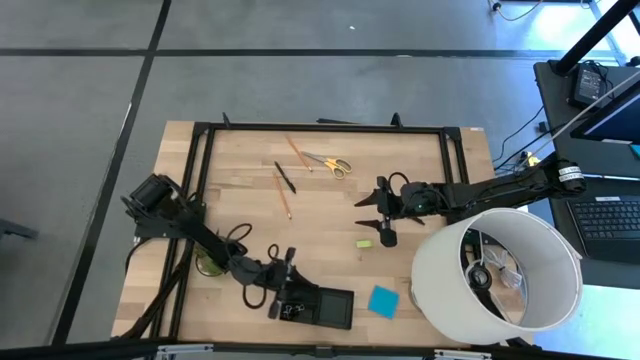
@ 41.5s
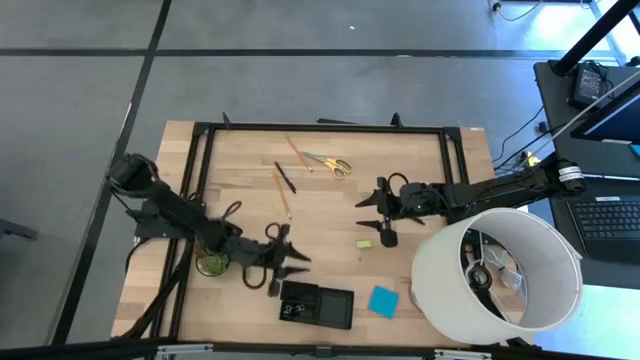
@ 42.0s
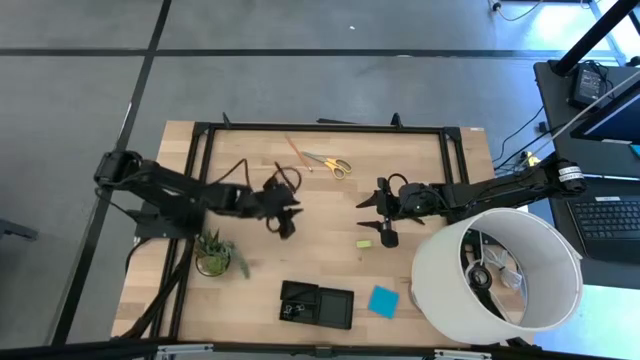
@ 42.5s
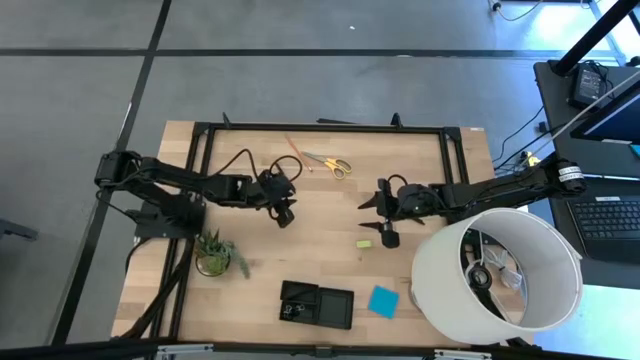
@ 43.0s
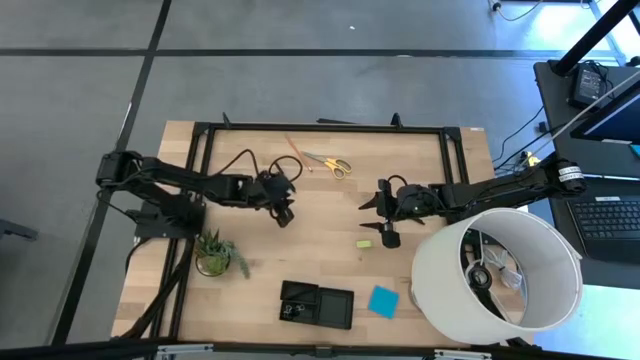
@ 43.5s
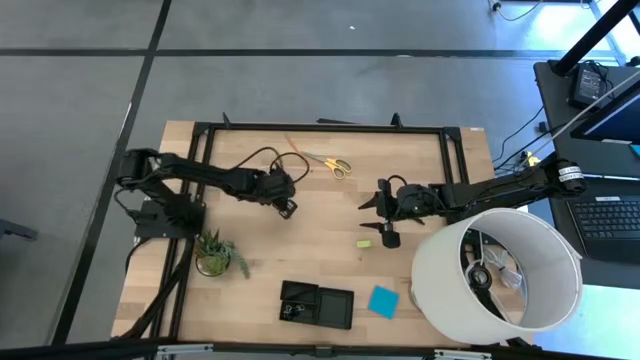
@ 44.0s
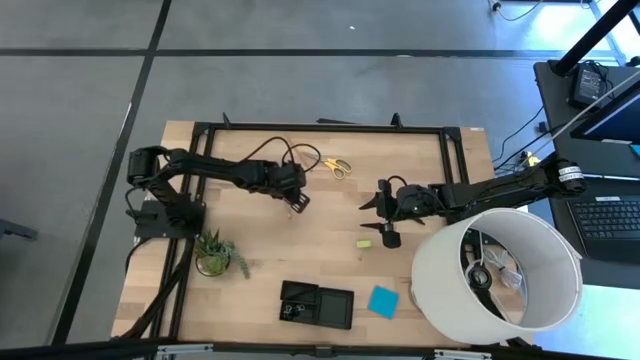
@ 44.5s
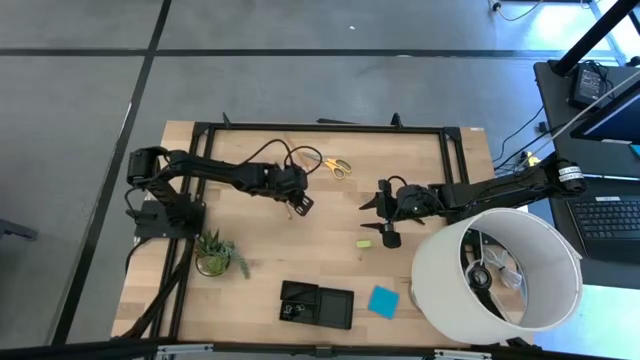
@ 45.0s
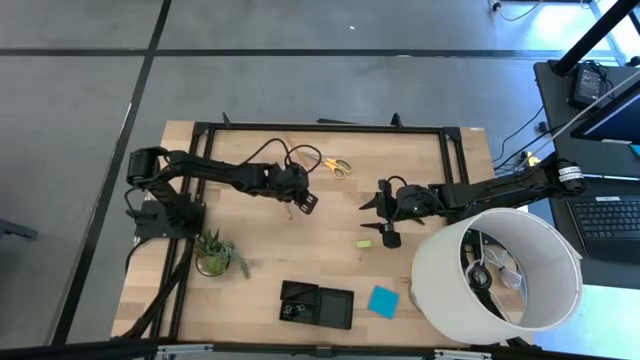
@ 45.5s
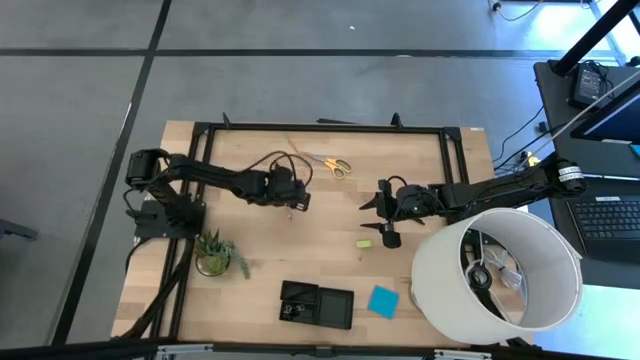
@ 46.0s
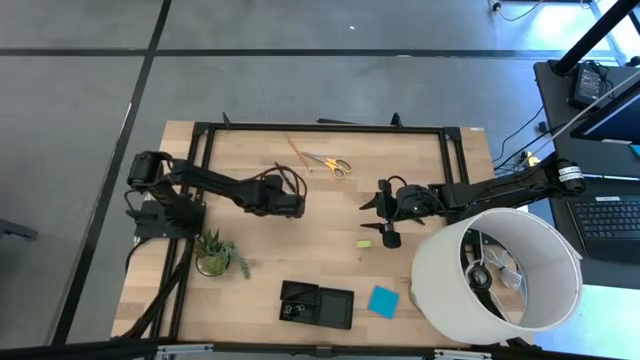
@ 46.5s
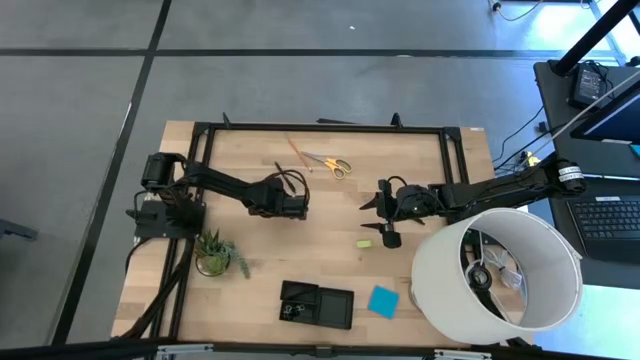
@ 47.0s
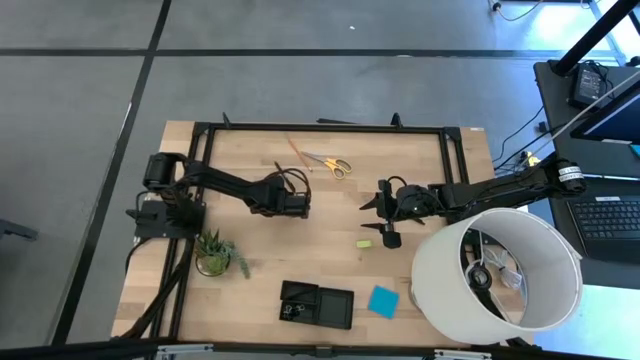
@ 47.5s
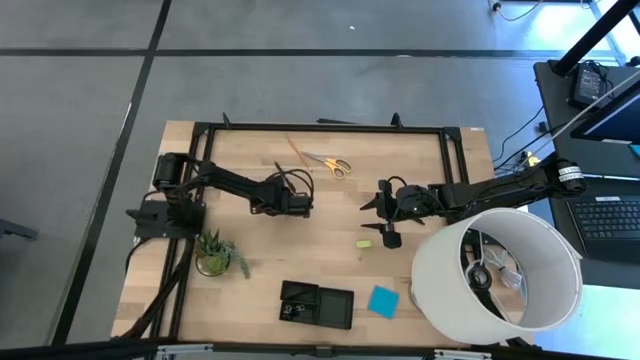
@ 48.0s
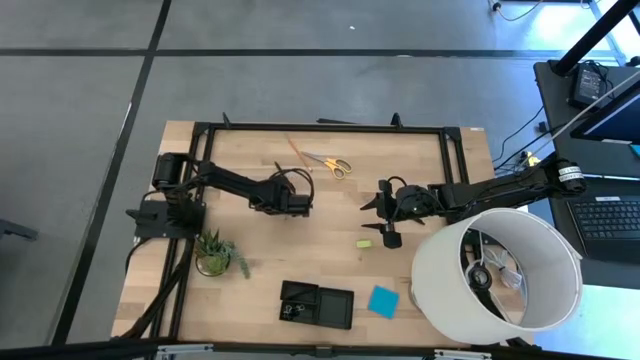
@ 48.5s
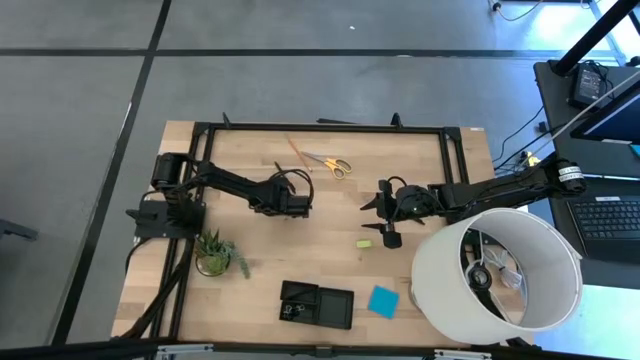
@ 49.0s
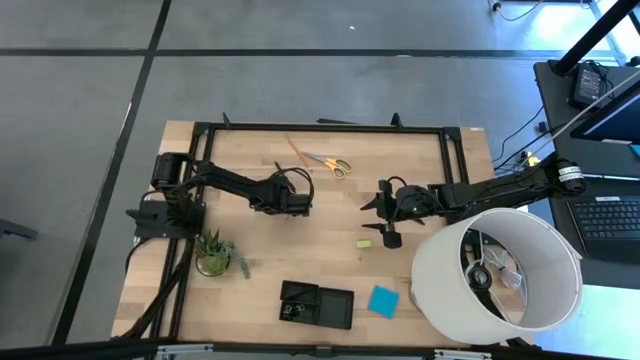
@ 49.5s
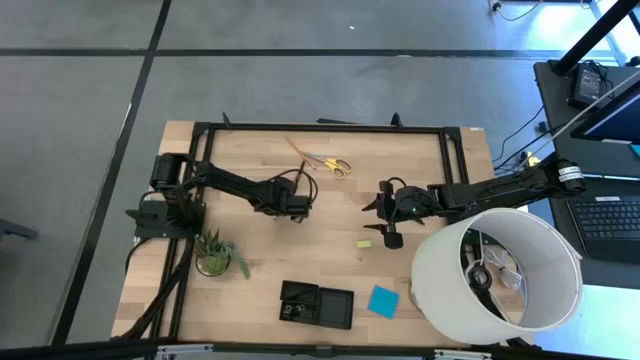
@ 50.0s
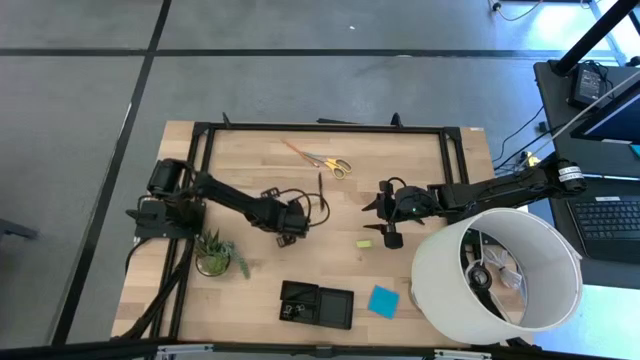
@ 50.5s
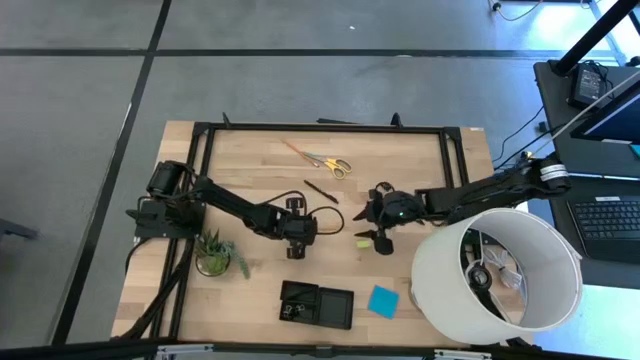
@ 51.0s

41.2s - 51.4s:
Task: Pick and place office supplies into organizer
Put the bottom yellow pencil into the black desk organizer

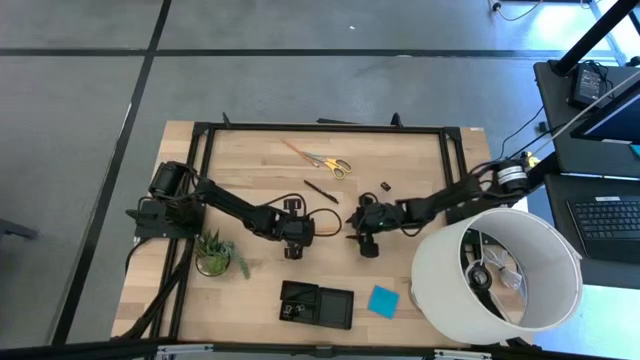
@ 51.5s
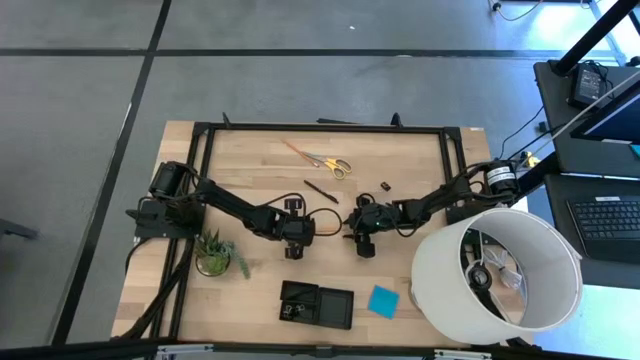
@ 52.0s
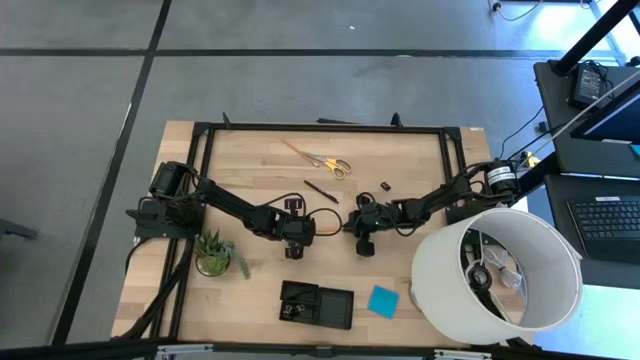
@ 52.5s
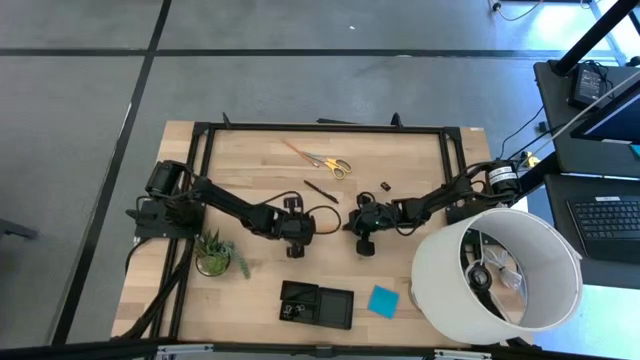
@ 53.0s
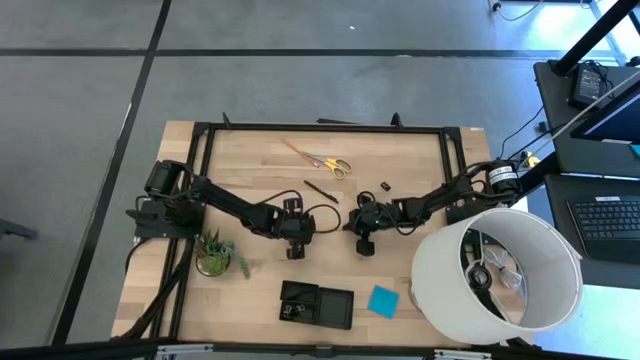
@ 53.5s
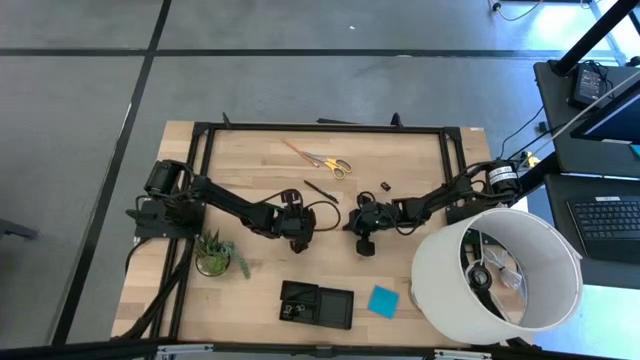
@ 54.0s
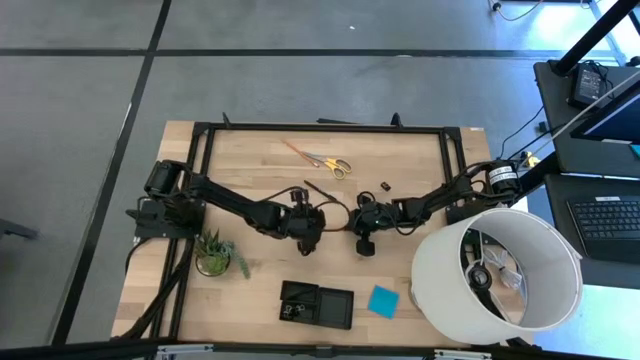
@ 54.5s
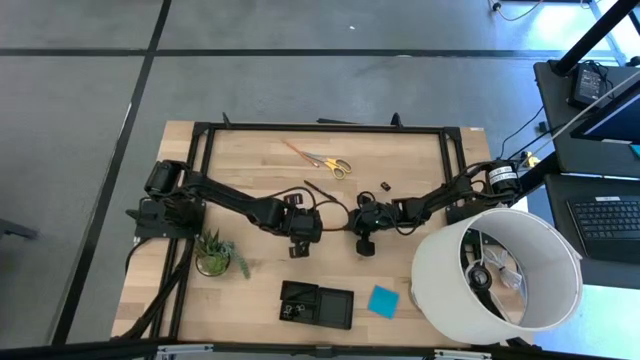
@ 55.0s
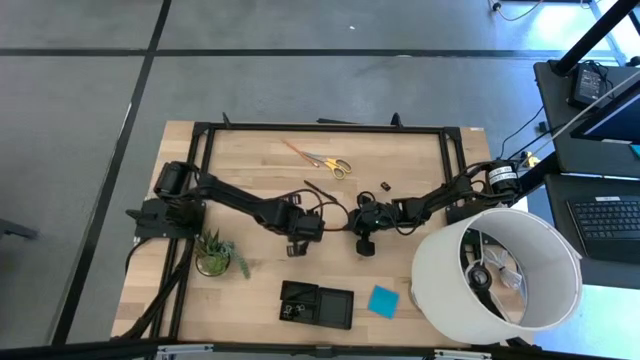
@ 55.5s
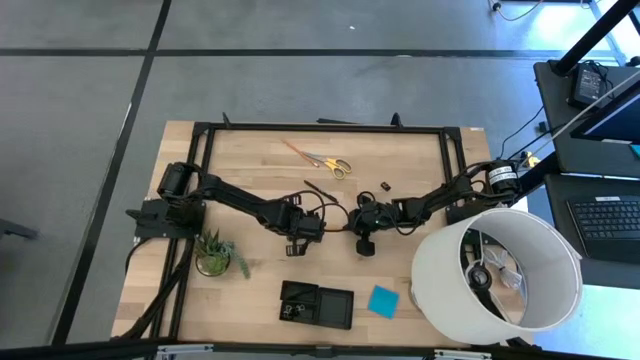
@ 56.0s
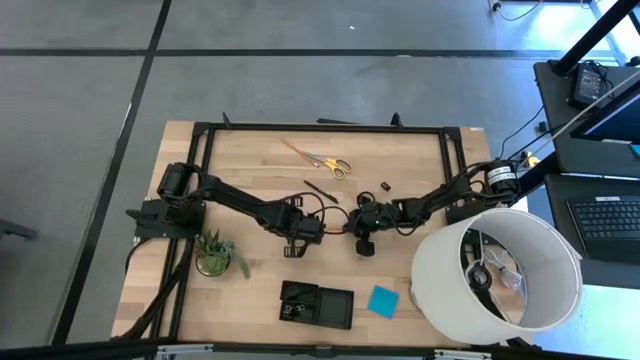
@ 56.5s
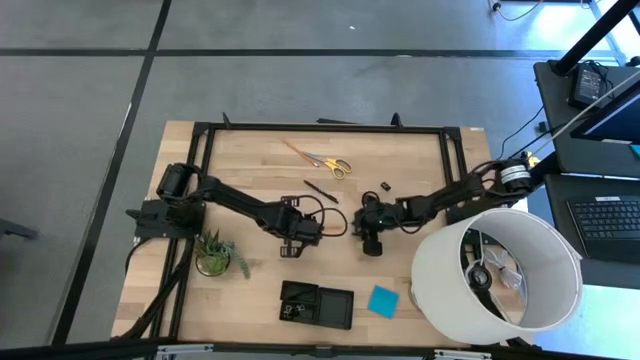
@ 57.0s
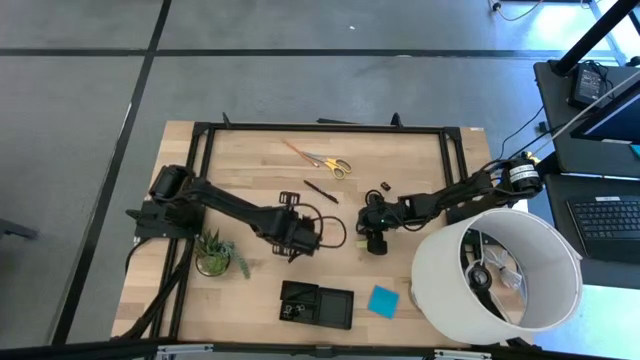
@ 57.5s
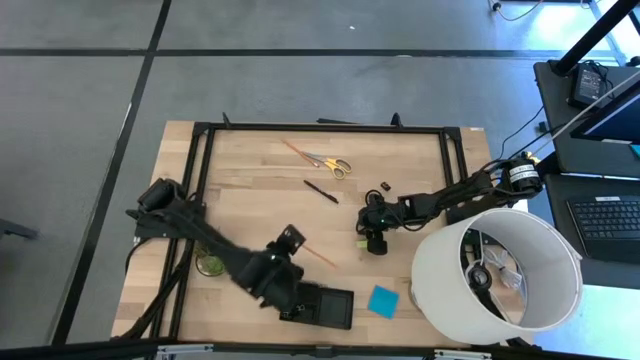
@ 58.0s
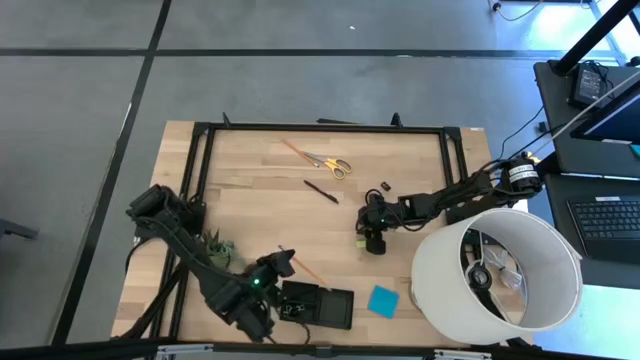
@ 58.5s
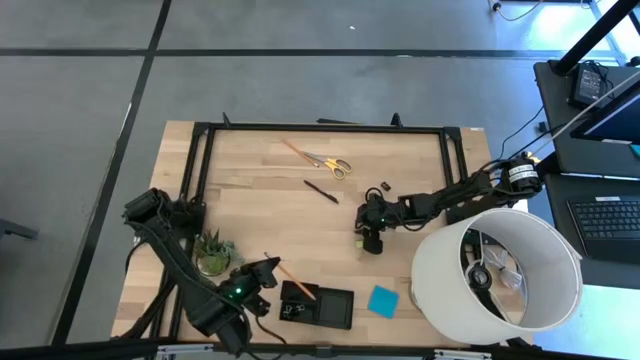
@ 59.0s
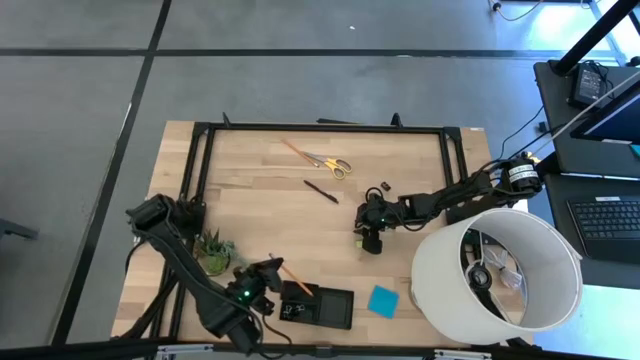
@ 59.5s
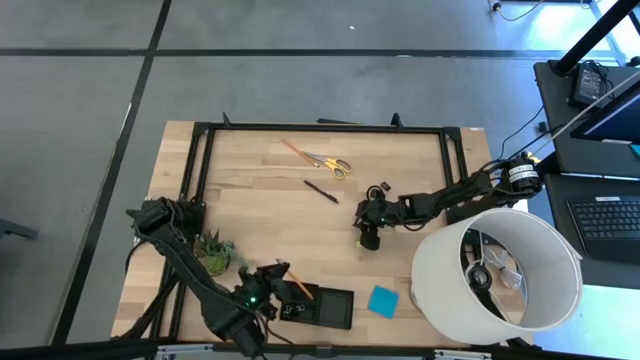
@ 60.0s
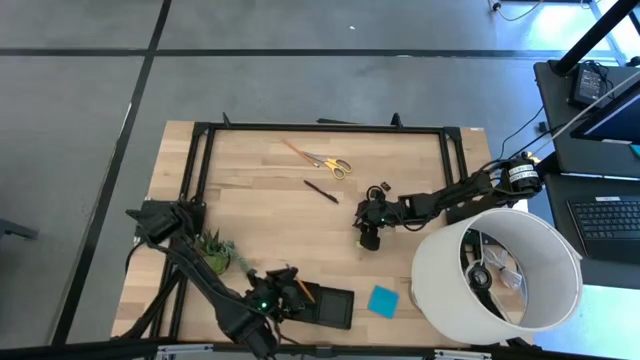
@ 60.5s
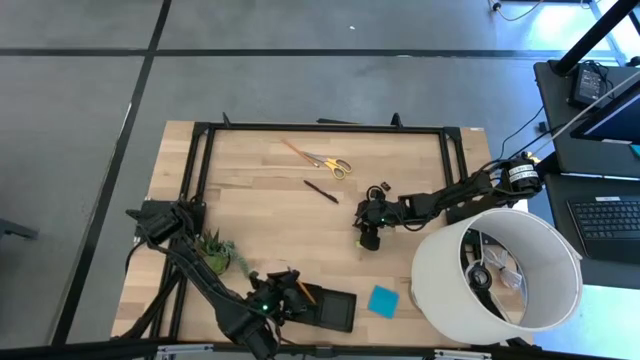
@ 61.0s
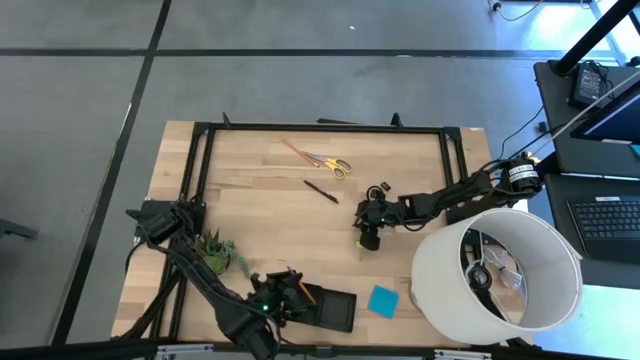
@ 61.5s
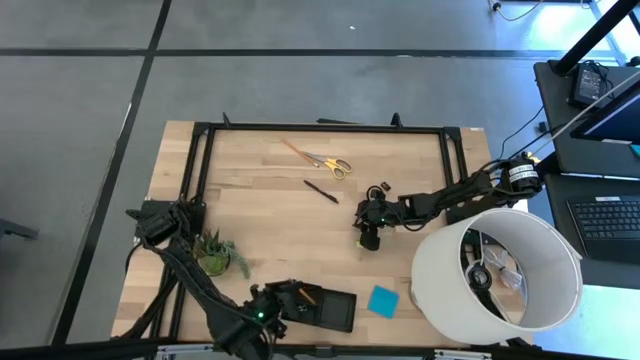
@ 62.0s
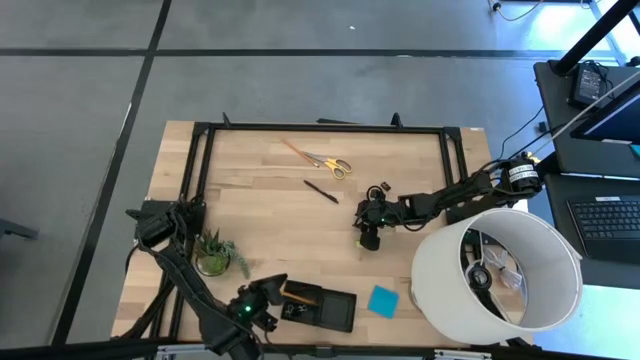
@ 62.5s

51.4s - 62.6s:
Put the bottom yellow pencil on the black desk organizer
